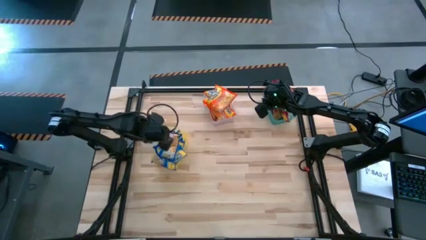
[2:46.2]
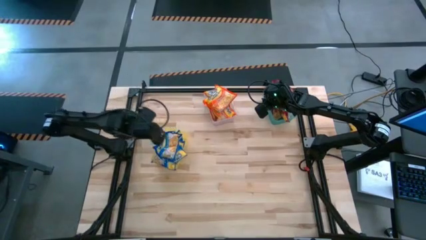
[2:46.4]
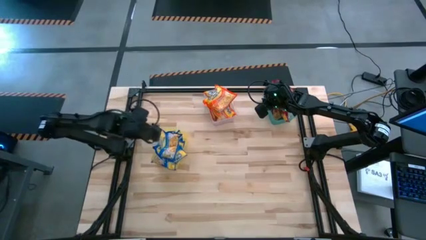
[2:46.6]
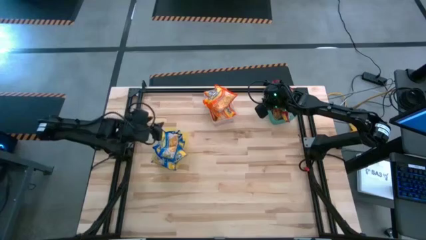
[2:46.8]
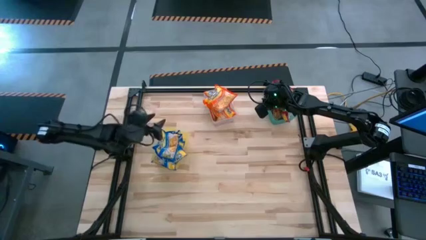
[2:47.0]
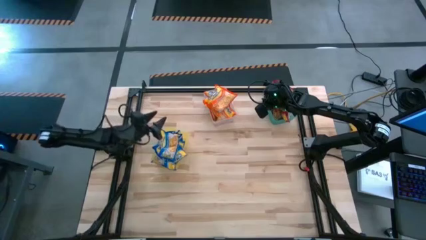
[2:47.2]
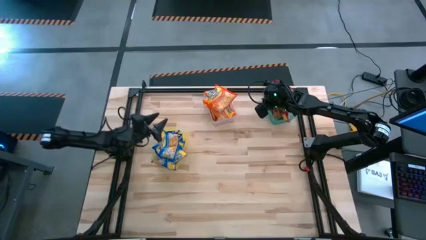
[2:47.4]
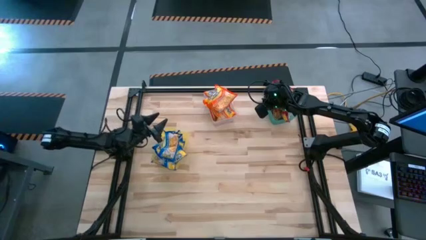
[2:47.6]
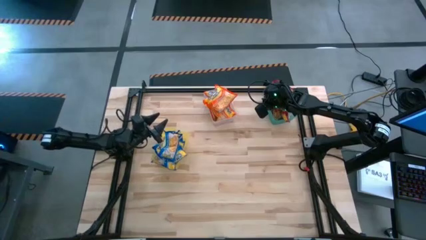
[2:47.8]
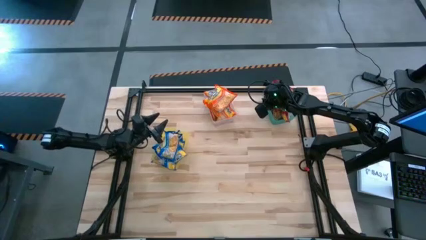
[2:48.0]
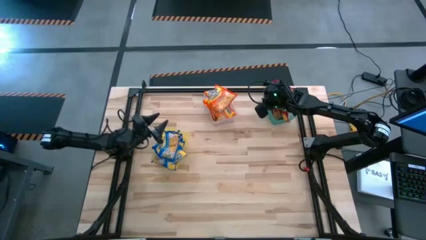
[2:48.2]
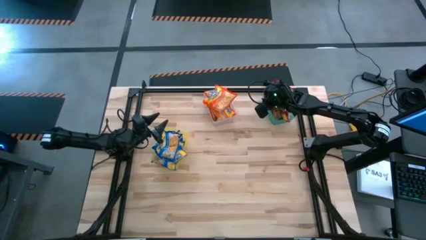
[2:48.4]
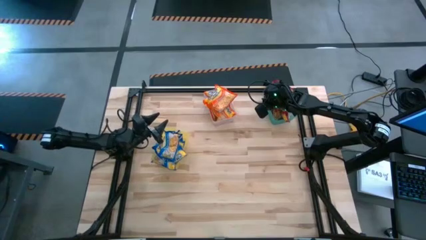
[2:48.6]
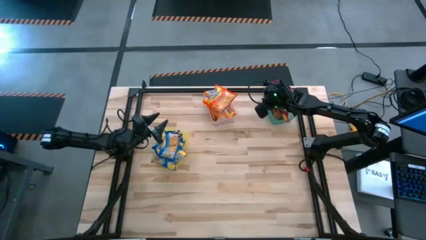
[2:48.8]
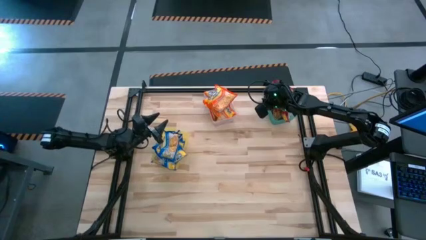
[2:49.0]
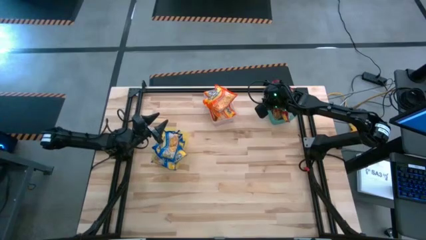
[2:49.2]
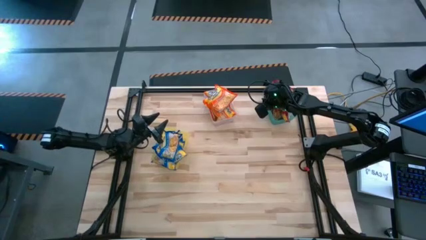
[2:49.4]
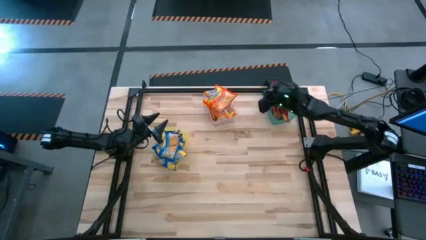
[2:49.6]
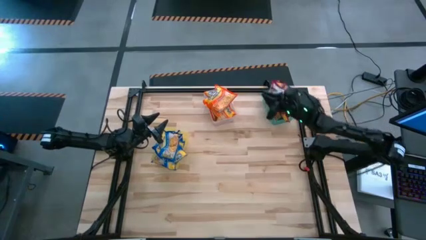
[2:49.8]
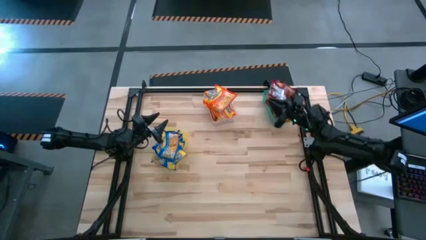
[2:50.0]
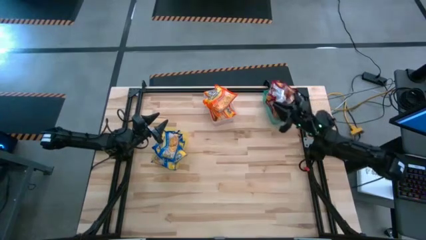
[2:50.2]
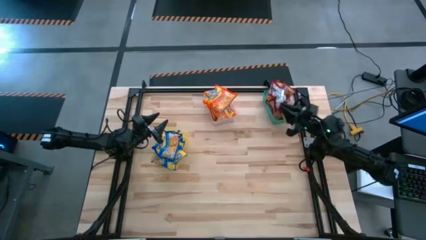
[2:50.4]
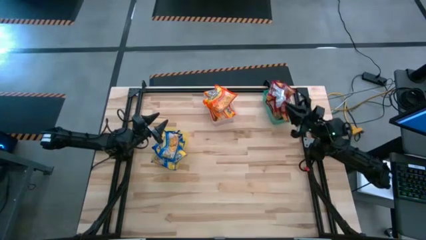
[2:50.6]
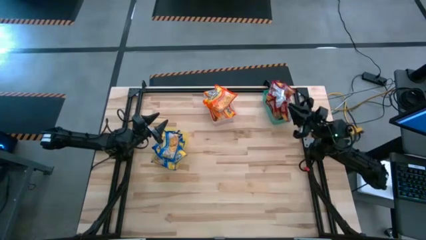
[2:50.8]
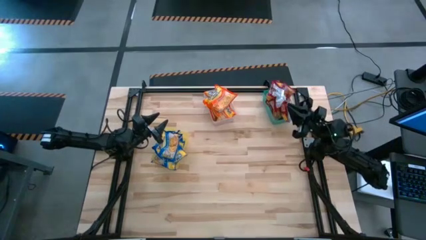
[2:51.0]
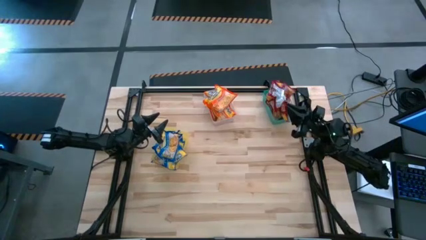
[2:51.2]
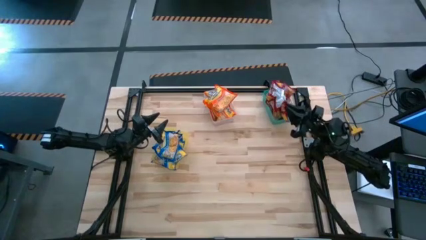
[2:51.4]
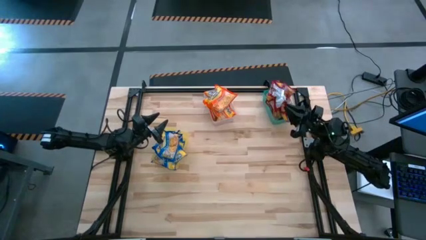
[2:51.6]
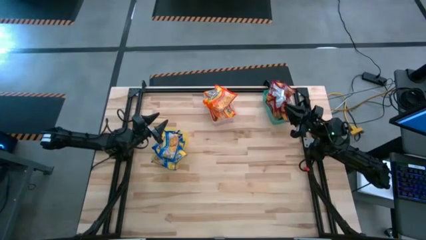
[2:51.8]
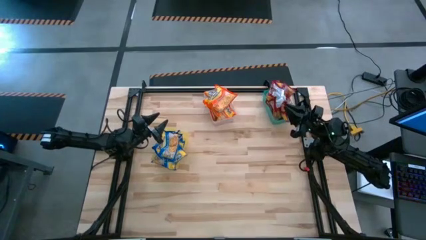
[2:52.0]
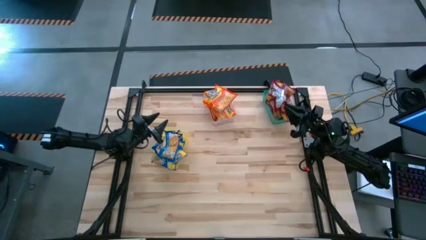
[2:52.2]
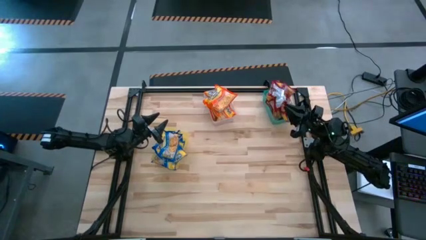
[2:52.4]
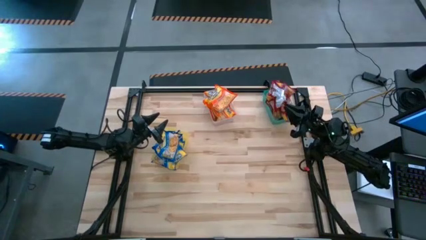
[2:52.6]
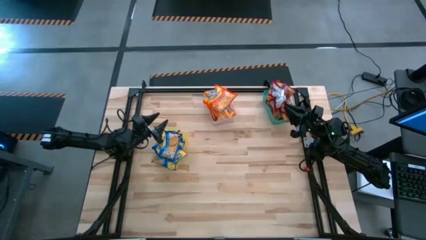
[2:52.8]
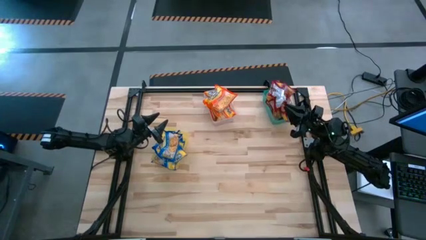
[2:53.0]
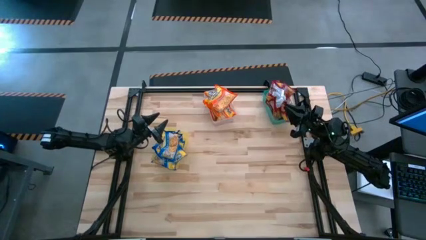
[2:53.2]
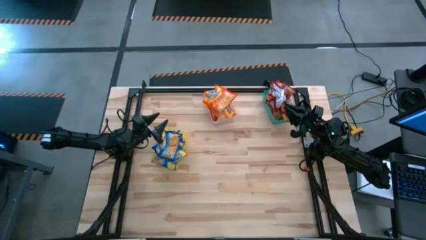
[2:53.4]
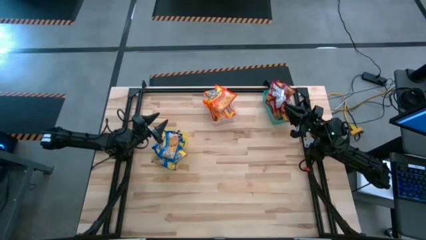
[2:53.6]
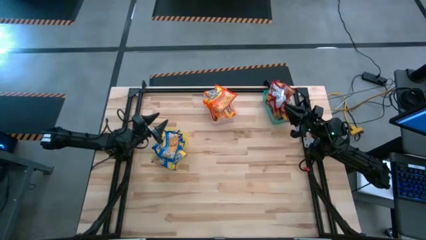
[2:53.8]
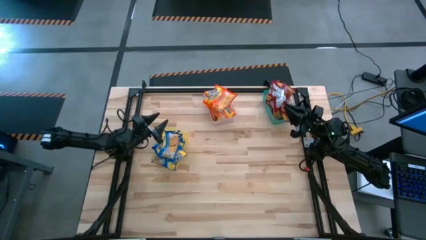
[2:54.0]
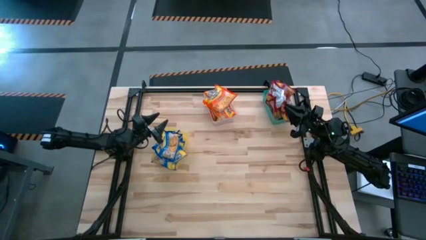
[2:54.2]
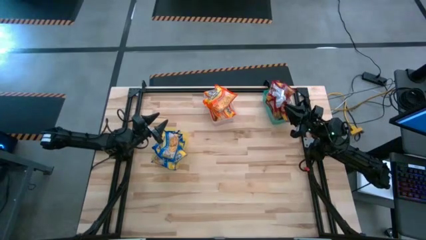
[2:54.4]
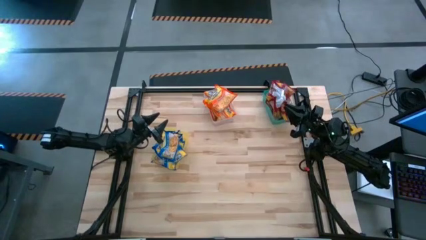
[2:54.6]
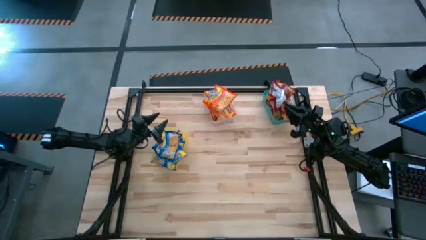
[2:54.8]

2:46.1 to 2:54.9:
Task: Sort Maruchan noodles
Return to Home Position

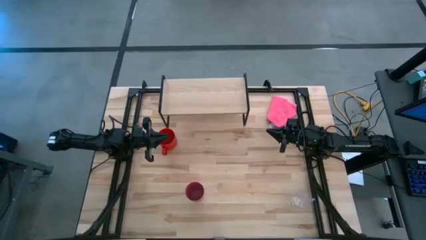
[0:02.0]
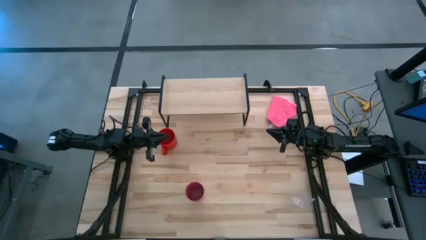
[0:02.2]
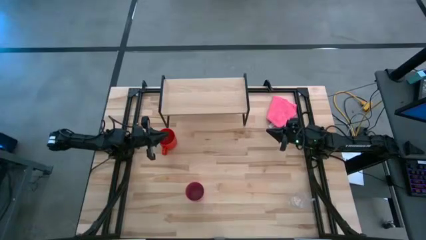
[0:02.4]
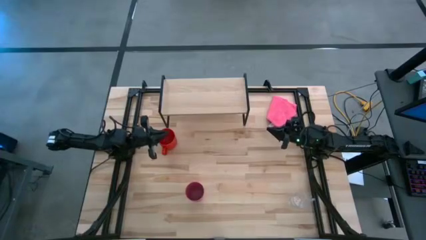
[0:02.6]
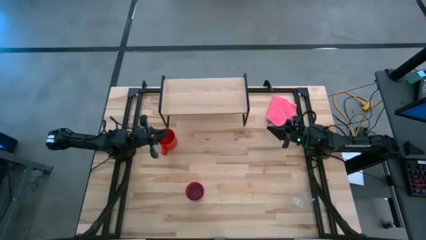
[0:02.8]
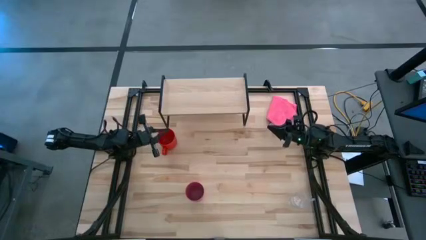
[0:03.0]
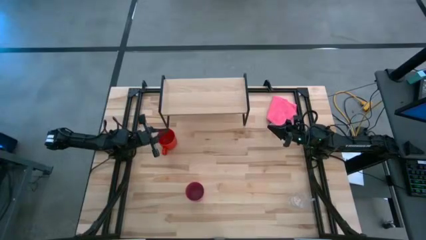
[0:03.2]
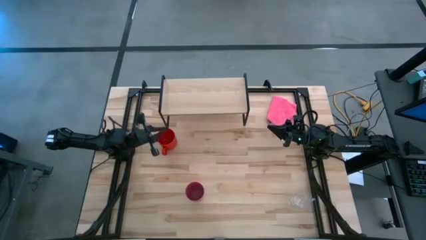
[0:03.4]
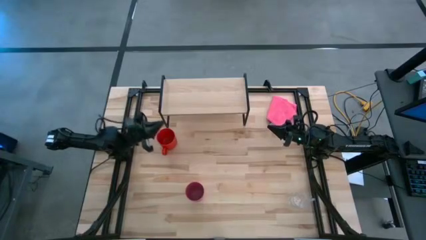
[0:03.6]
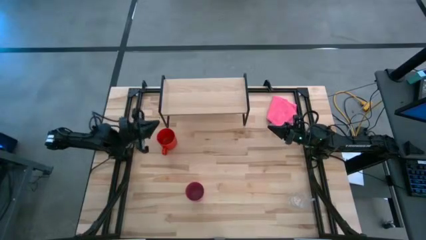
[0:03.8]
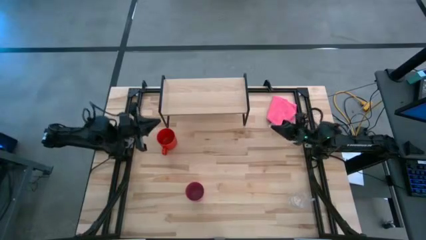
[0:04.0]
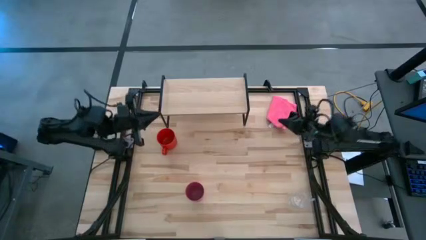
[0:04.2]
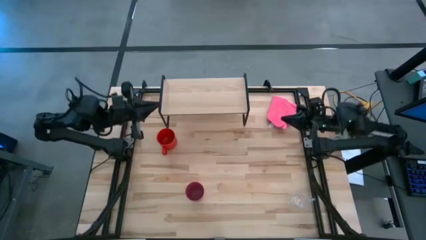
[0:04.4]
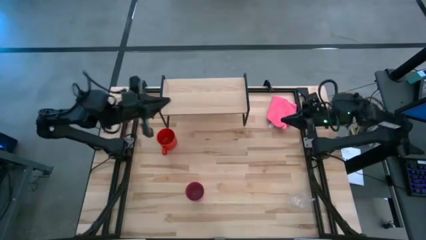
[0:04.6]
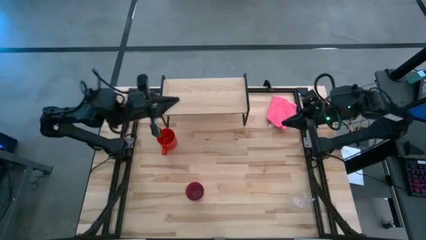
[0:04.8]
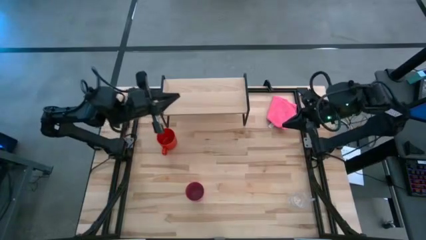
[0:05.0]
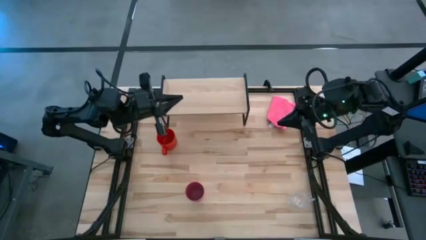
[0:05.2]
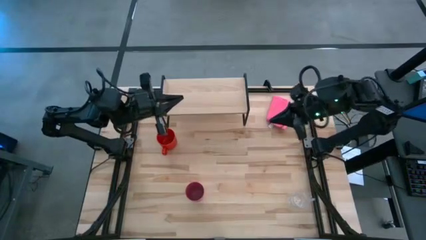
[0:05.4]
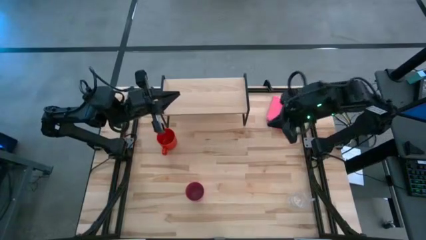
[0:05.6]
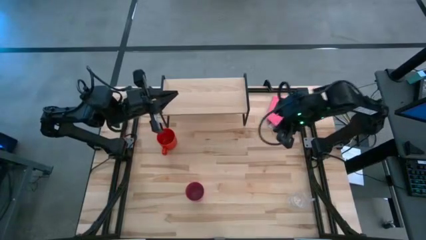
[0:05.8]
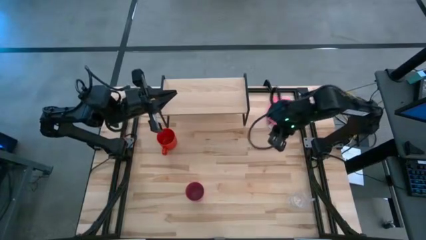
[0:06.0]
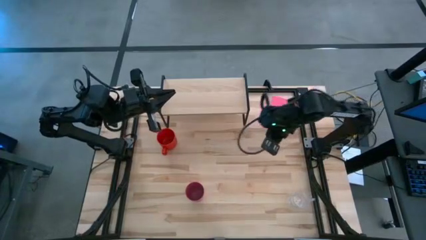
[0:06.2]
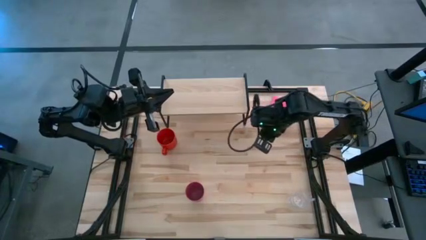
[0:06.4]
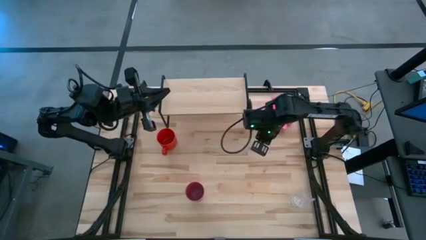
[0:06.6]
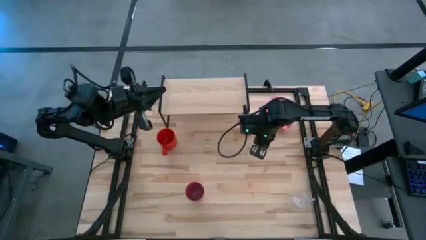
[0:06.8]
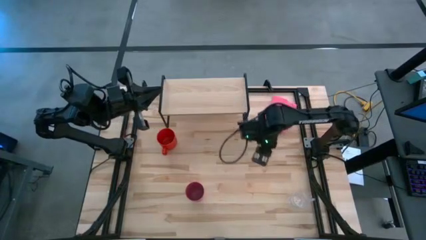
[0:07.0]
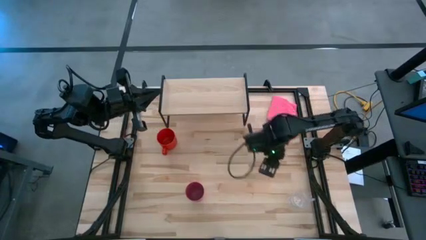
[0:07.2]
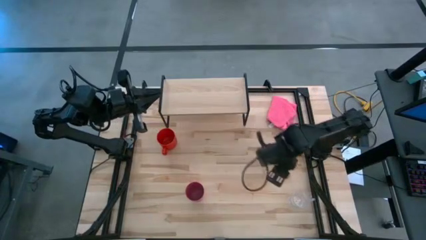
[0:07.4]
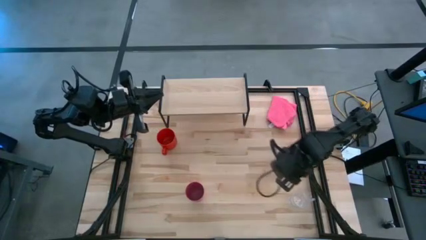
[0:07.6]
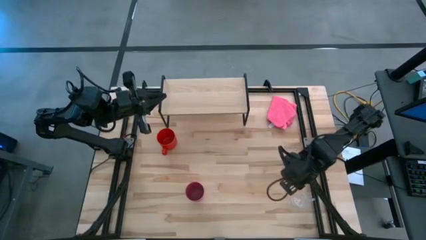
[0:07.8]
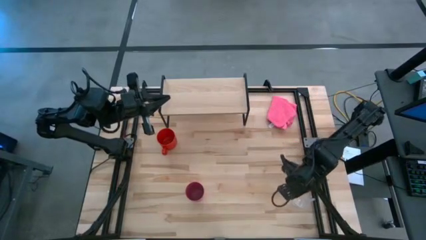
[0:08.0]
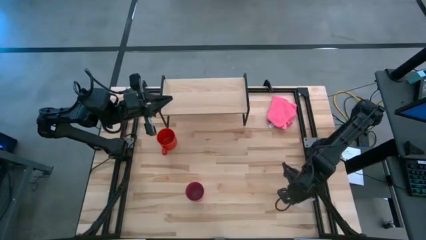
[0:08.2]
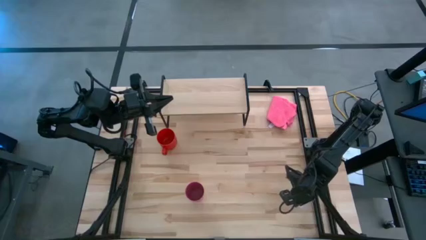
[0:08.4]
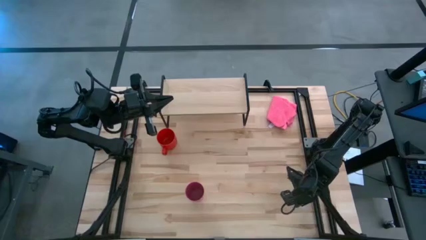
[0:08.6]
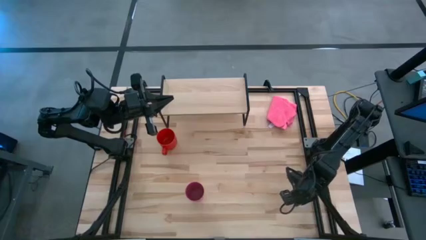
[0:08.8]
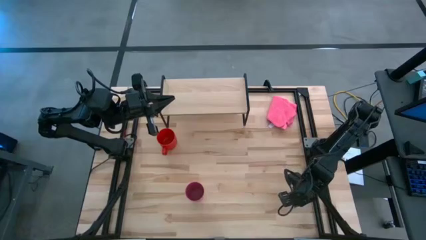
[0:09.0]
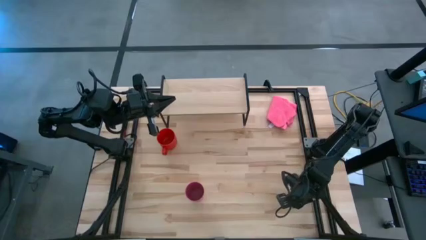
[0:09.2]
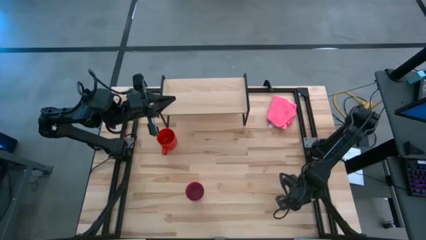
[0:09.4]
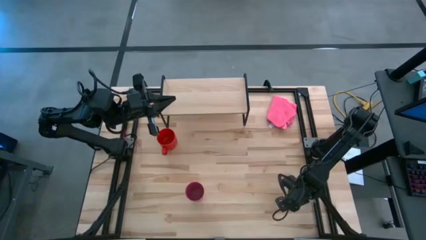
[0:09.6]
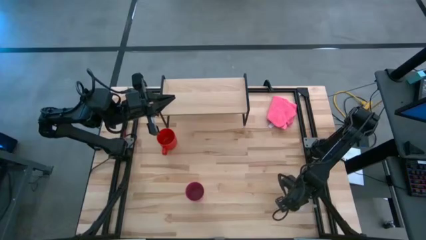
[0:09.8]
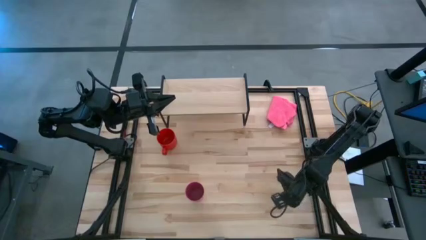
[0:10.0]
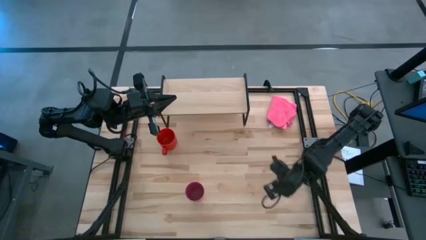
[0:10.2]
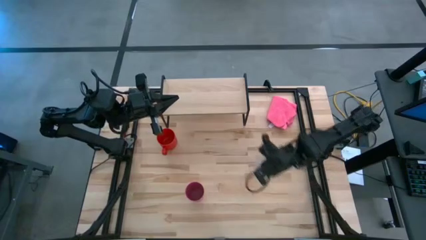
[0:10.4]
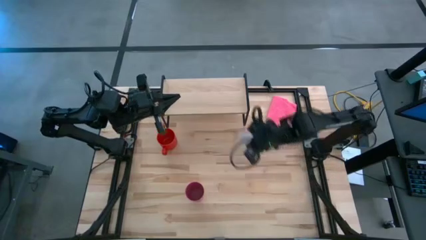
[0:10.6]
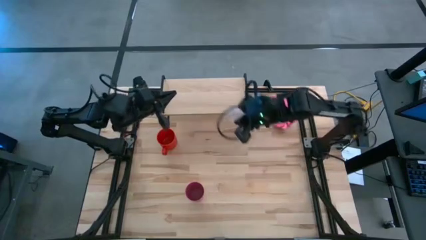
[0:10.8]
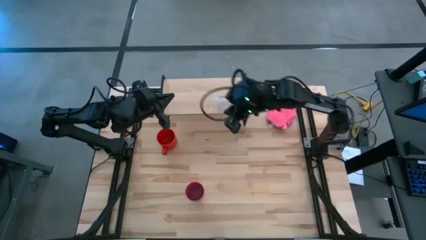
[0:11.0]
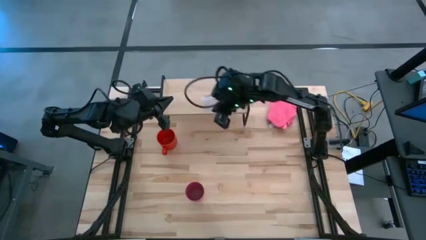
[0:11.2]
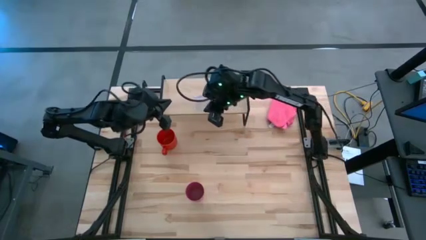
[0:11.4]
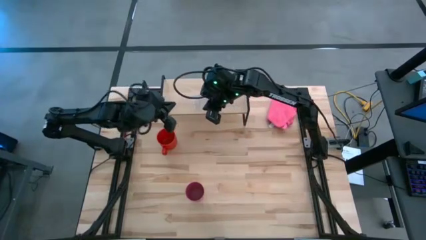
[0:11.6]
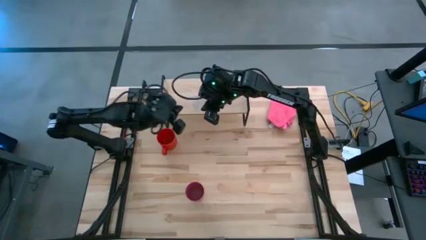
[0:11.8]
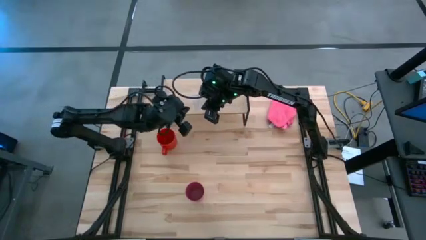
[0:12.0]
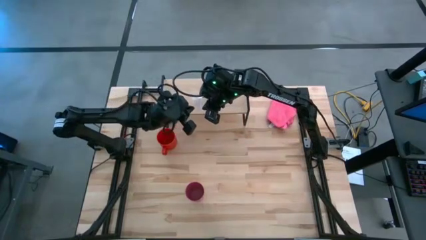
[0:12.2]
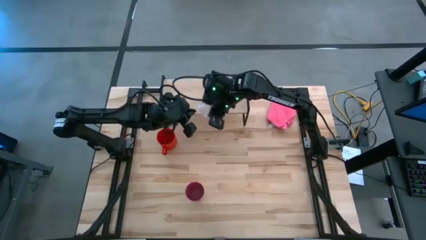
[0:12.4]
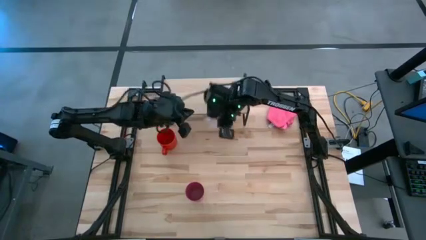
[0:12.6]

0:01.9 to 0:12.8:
Task: Stack small to large cups/mugs on shelf
Put the transparent mug on the shelf
